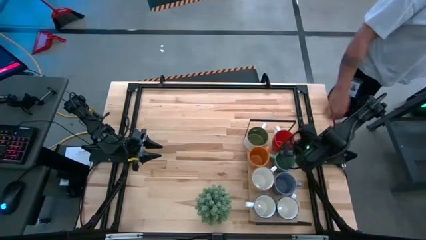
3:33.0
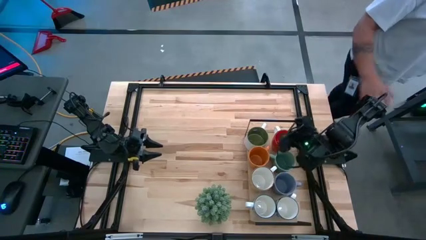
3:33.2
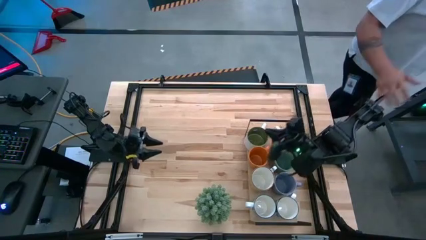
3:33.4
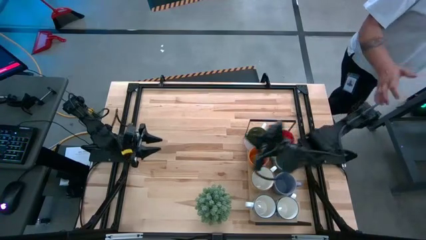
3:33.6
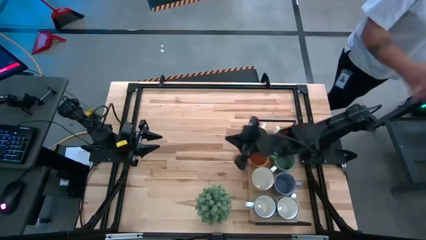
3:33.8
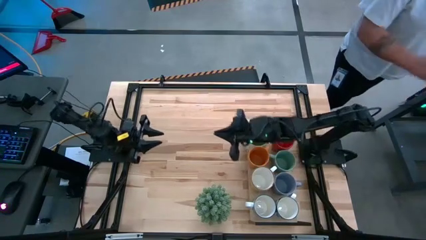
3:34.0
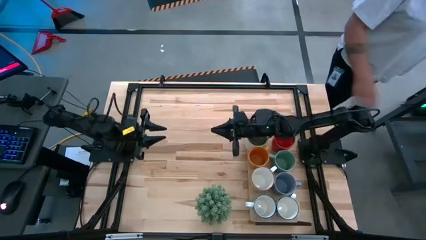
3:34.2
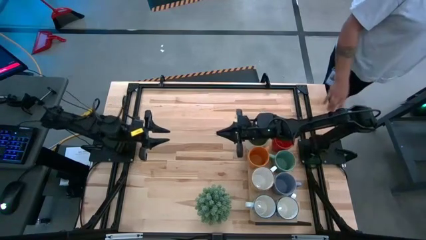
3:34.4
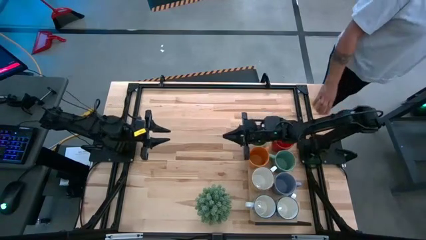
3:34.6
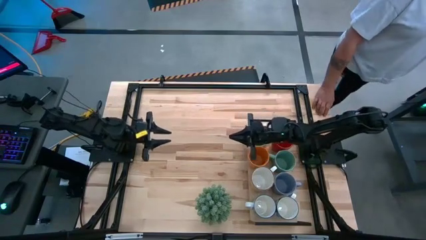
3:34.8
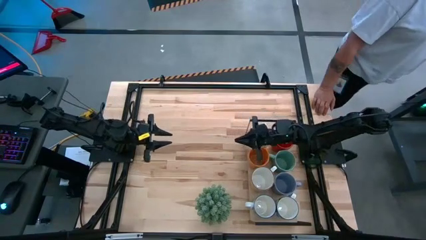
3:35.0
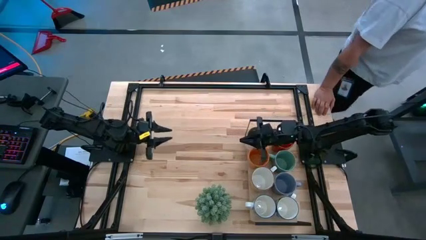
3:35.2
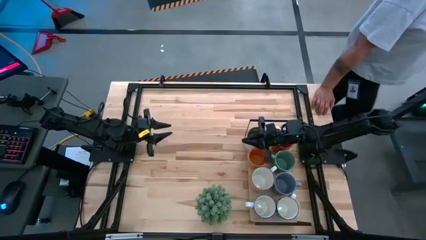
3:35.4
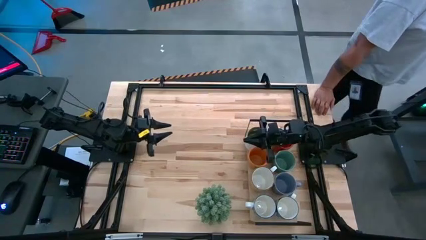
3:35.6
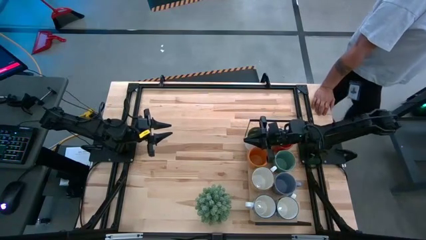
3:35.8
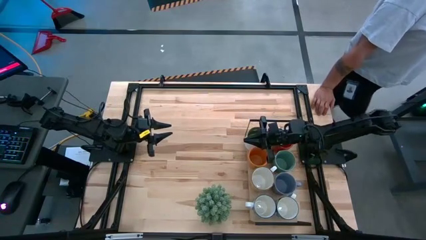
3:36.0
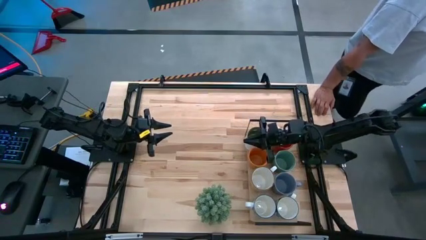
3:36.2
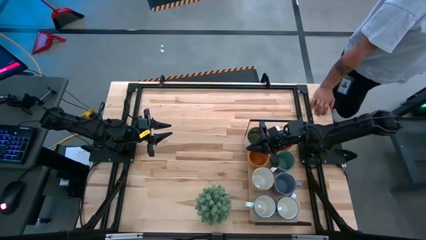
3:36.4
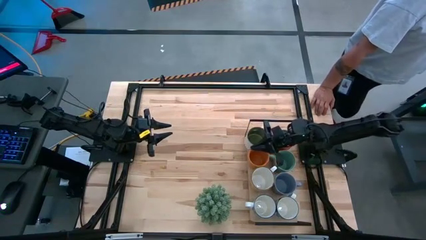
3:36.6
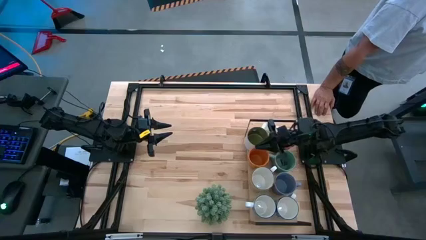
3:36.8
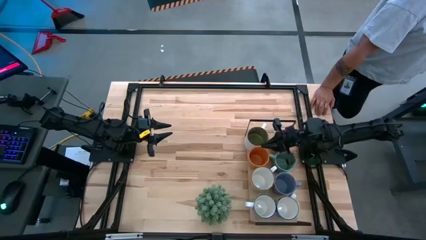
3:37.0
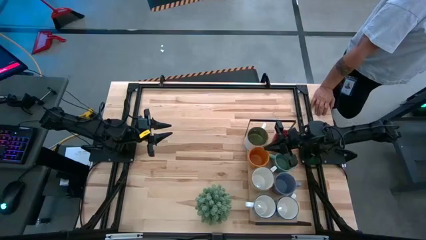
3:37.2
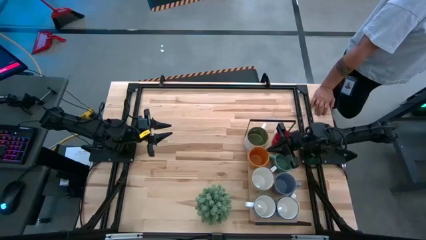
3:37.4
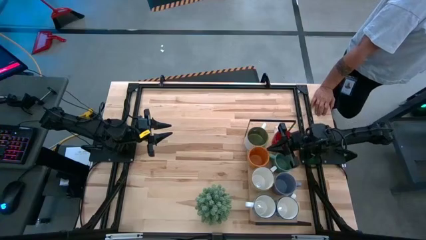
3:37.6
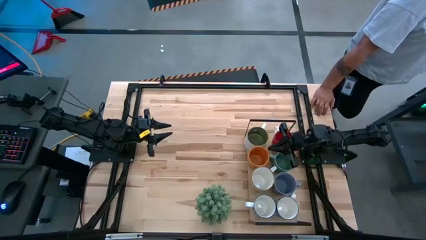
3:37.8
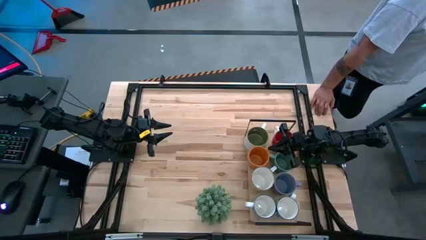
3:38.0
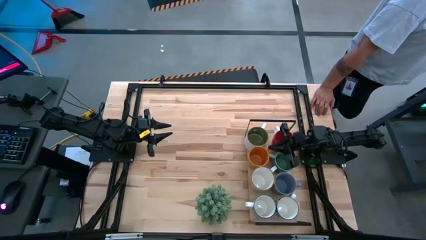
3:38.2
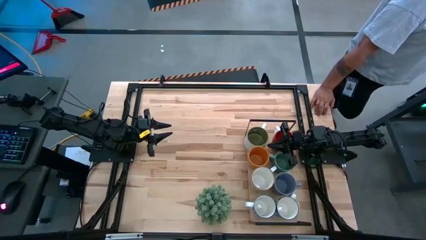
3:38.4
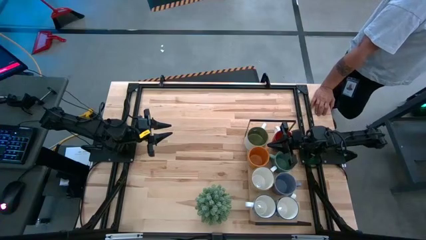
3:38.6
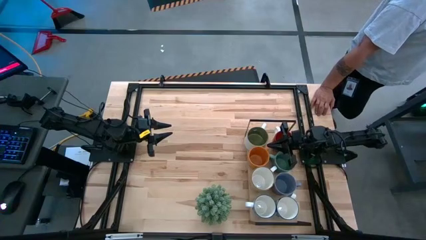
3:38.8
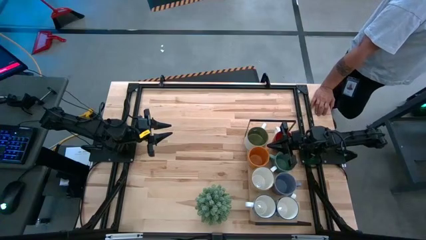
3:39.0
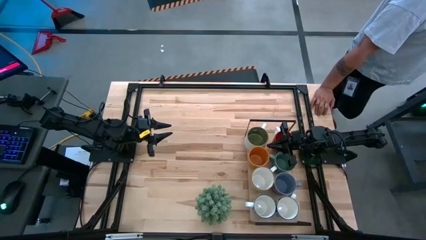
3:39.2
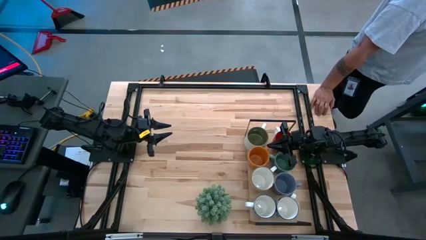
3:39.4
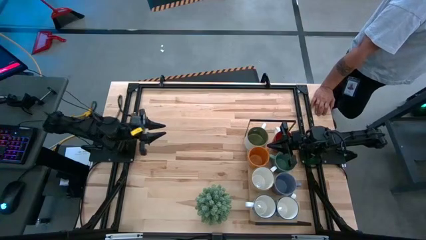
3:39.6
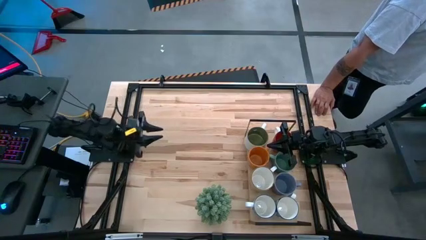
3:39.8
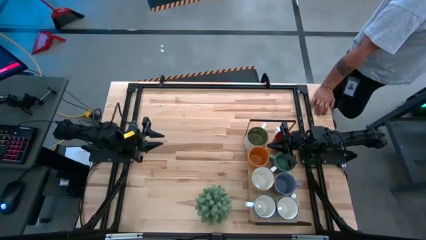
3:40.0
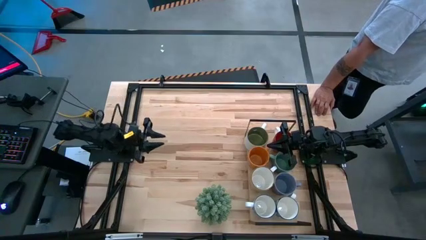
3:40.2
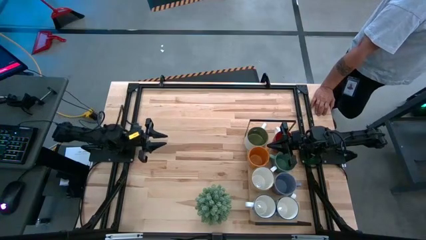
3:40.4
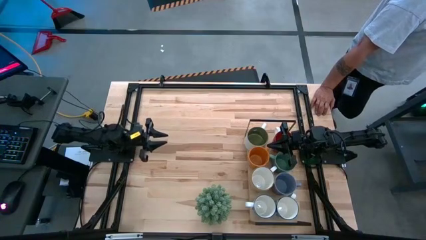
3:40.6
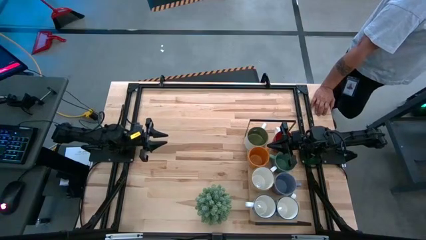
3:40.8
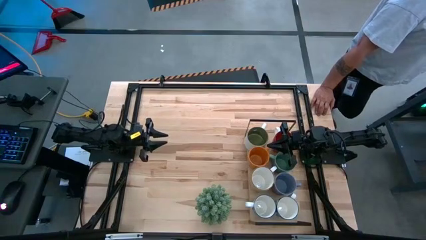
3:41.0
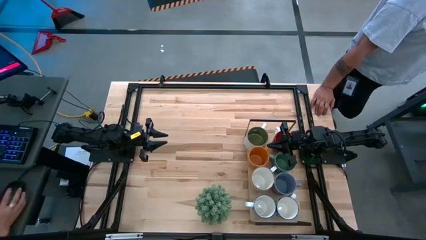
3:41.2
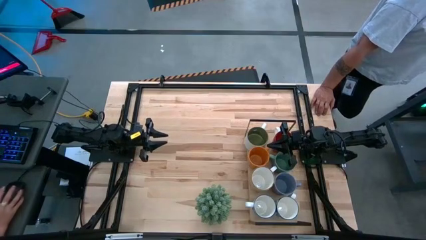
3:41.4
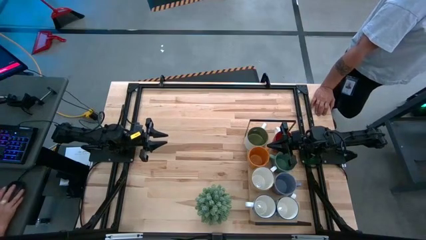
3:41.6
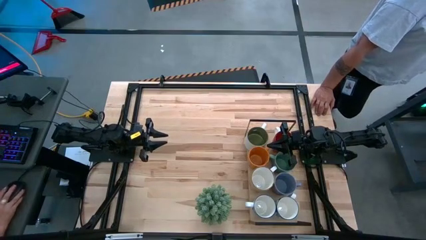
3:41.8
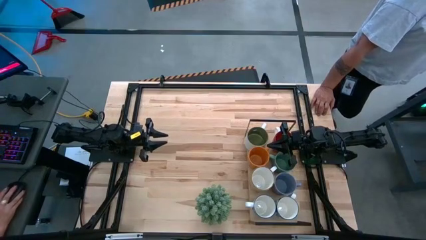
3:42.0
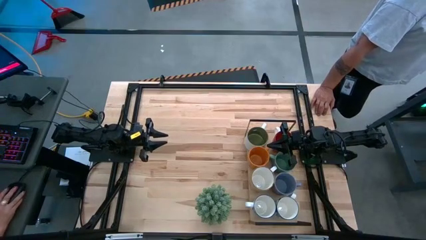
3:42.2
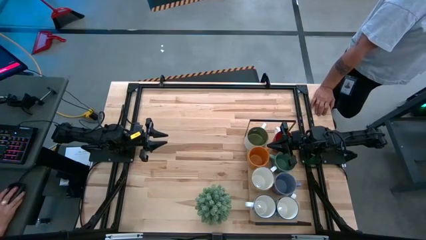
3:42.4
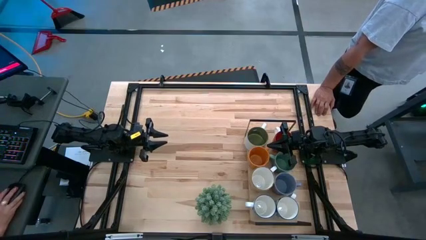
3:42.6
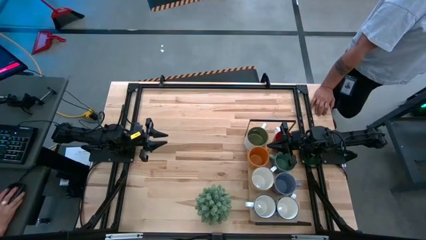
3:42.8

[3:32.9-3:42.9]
Task: Place coffee mugs
Return to Home Position

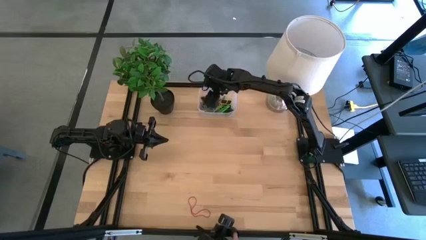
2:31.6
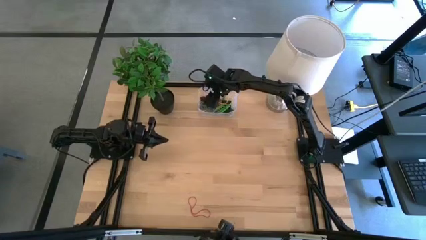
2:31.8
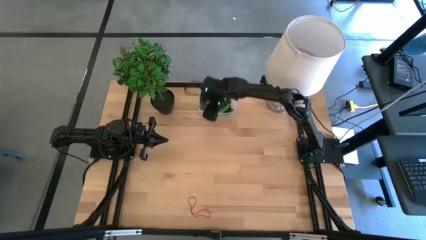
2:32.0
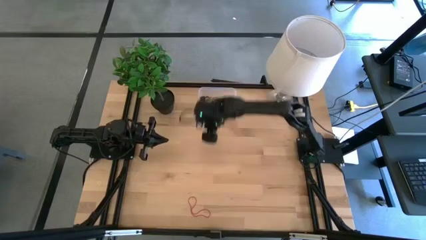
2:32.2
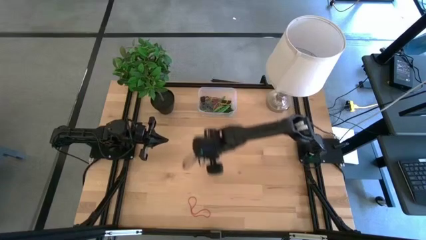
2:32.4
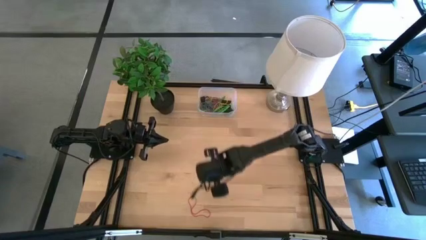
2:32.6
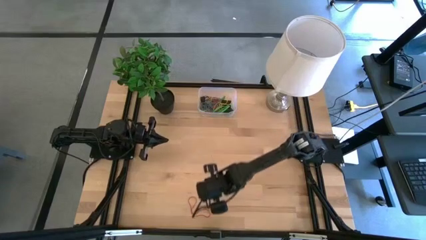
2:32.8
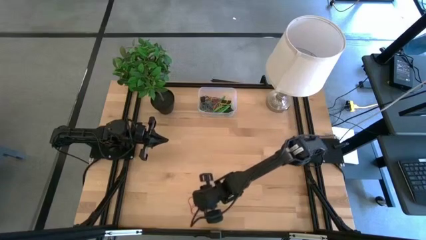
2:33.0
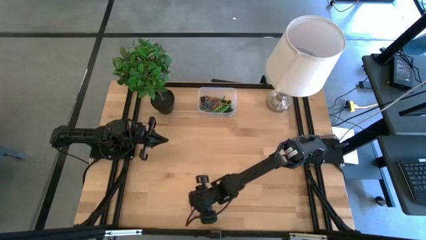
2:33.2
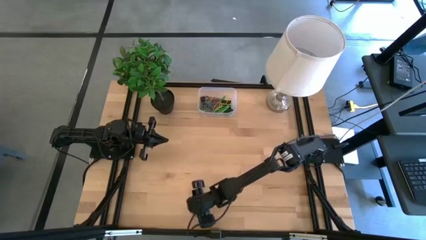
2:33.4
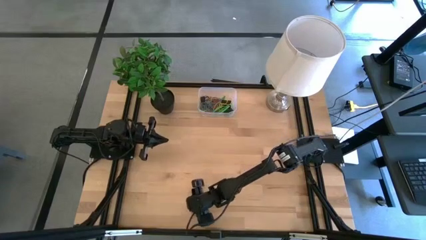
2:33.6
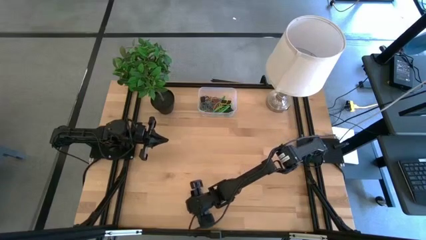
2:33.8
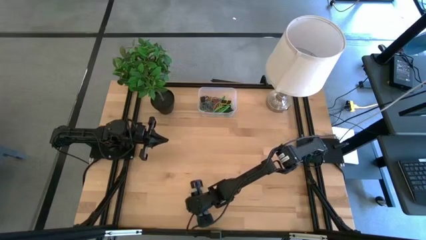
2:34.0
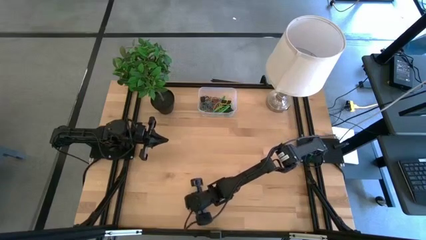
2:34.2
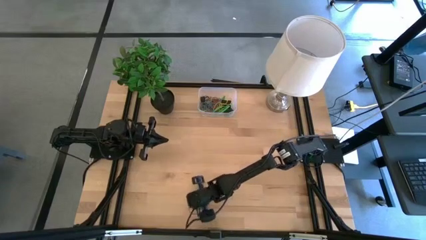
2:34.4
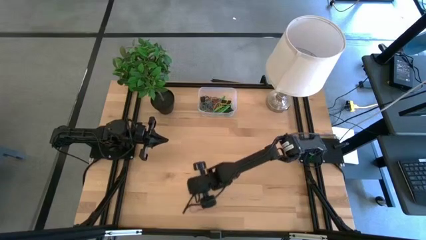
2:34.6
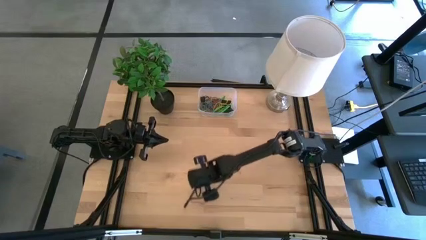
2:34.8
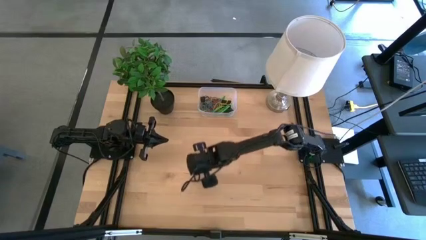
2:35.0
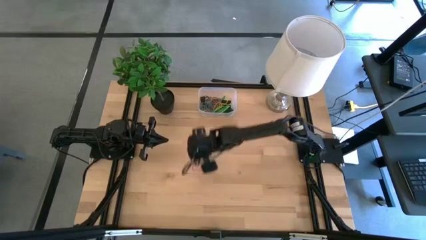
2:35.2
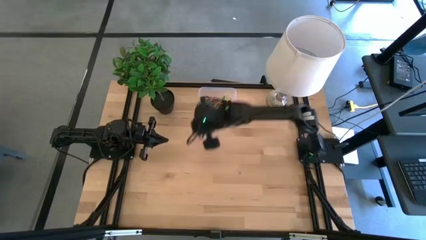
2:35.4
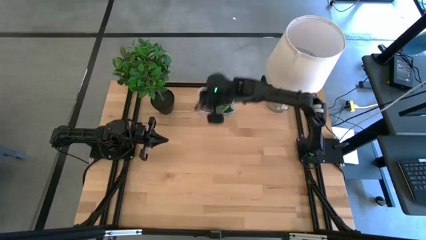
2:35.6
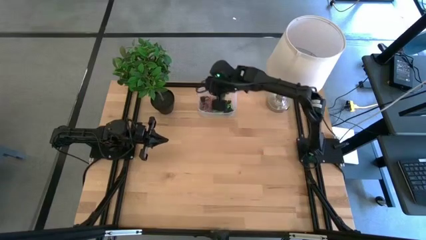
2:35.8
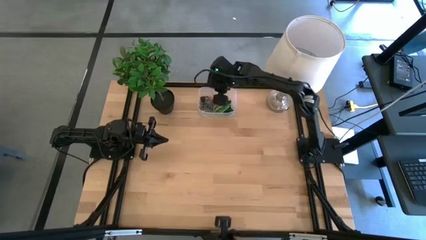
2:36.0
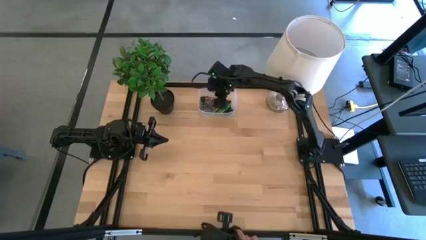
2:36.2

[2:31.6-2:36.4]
Task: Pick and place rubber bands into bin
Put the red rubber band into the transparent bin
